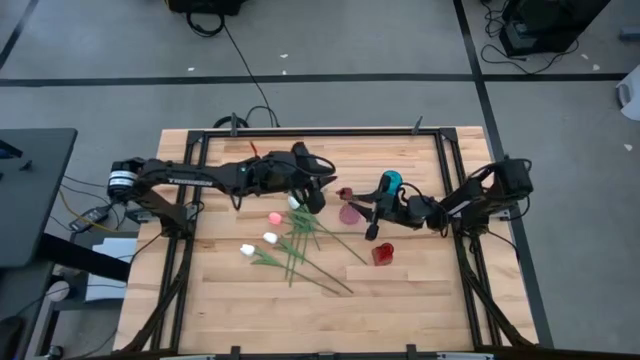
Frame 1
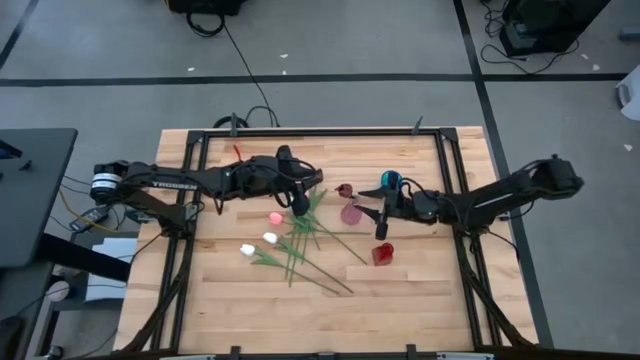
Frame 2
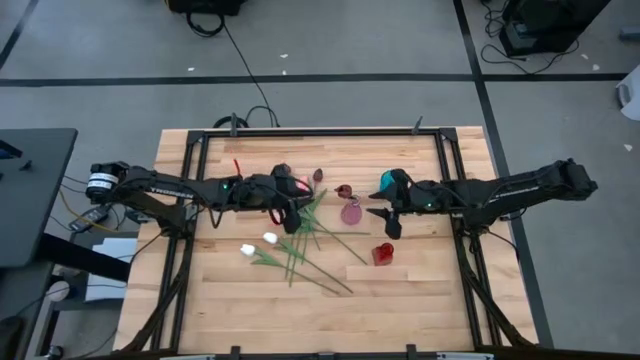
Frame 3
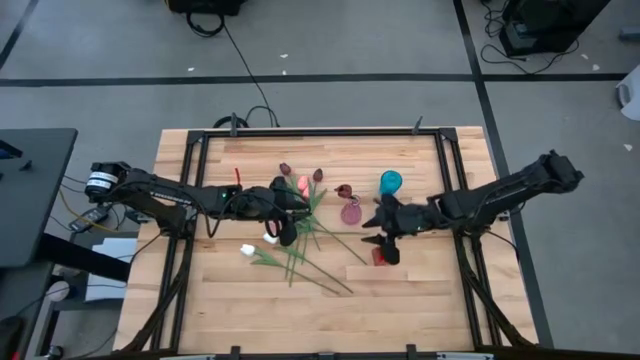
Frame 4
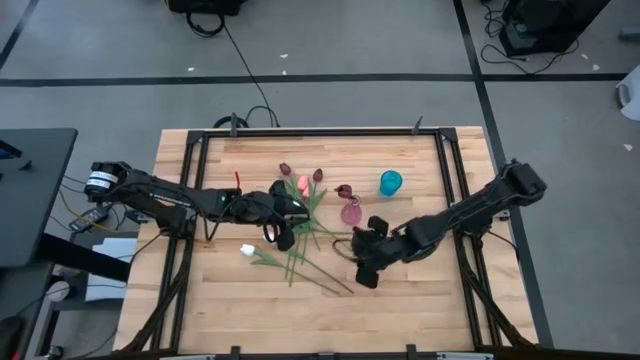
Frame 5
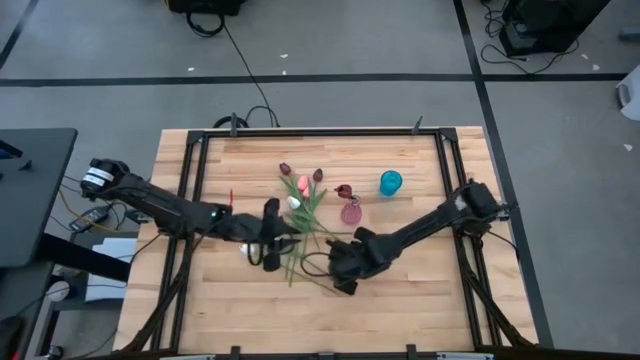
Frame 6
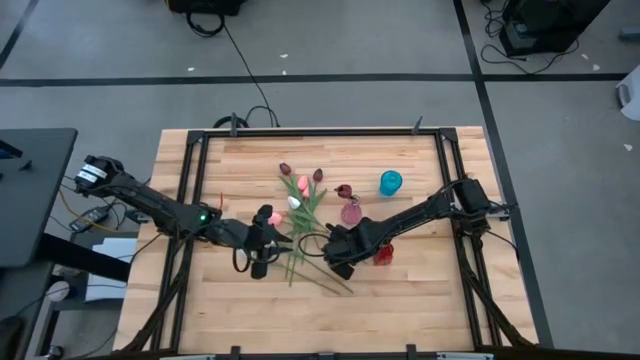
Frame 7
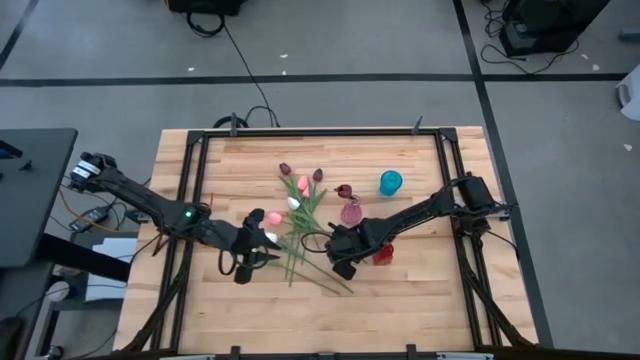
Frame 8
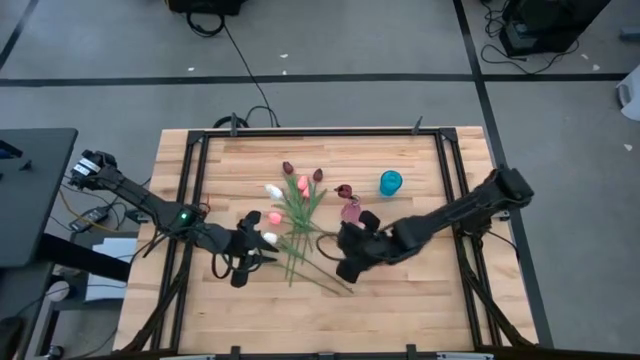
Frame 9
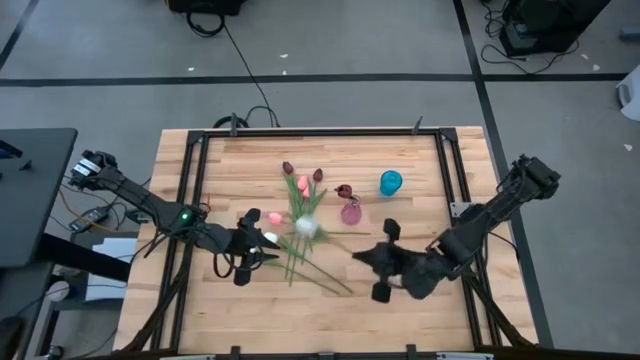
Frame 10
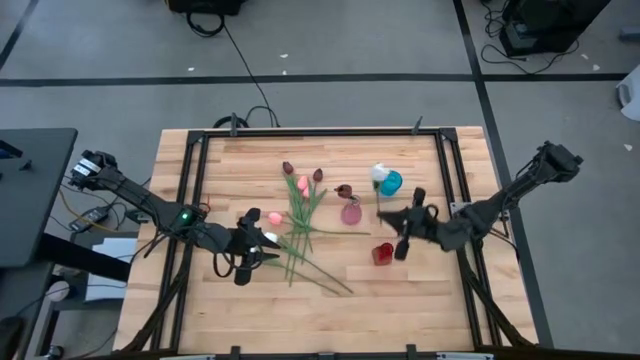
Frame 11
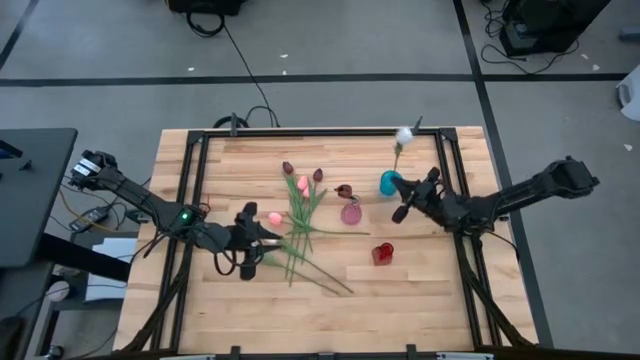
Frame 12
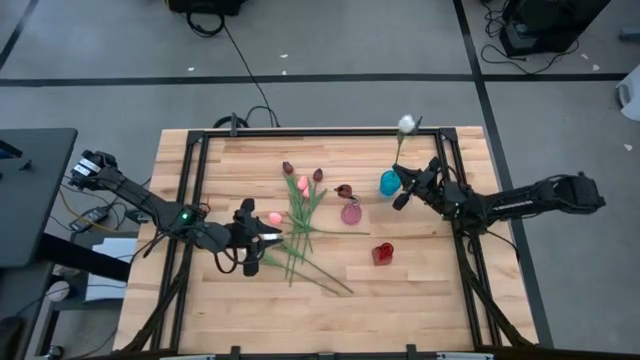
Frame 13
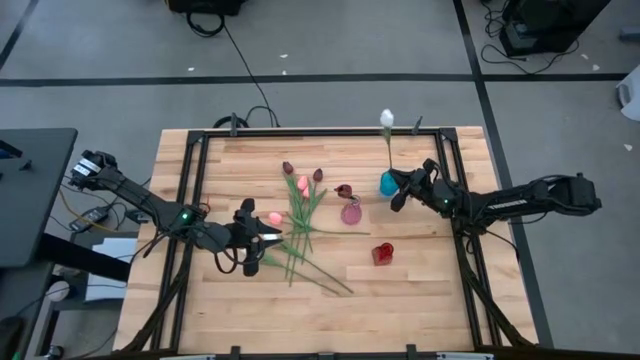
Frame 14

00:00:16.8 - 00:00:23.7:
Task: Sort flowers into vase by color
Put the white flower into the blue vase

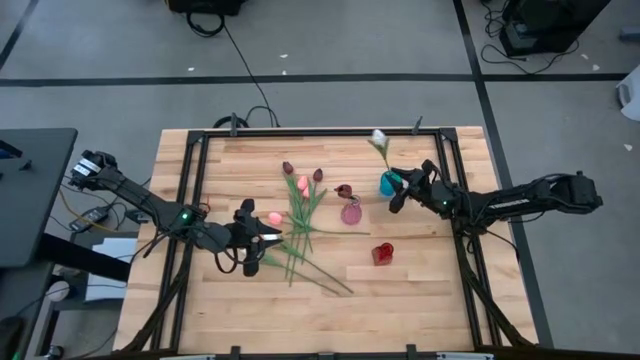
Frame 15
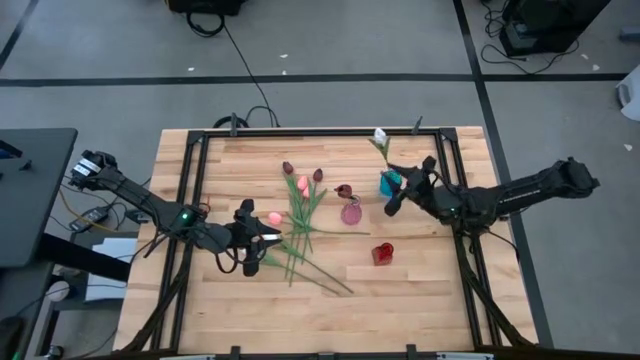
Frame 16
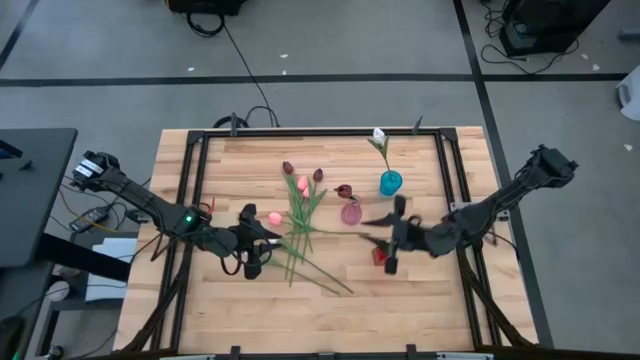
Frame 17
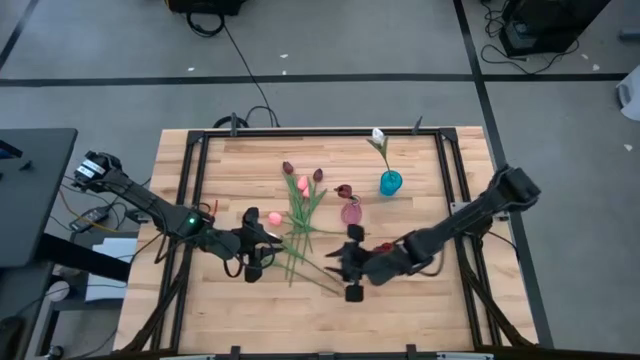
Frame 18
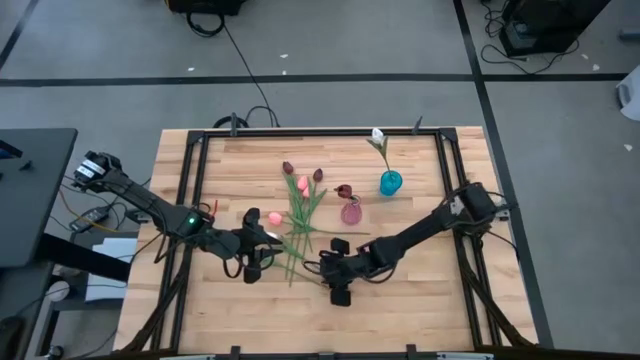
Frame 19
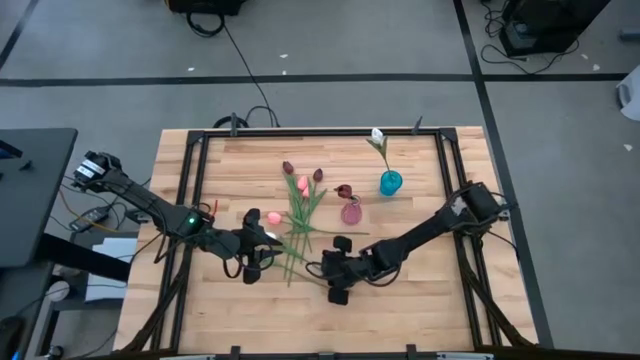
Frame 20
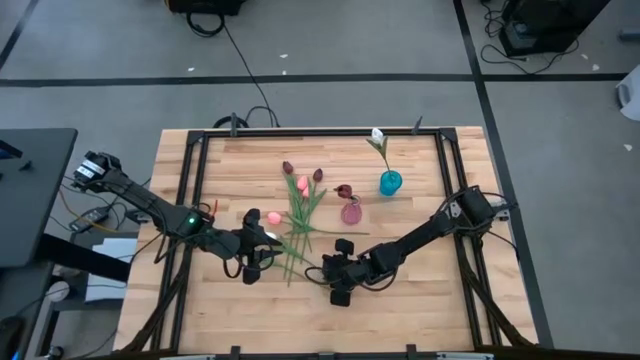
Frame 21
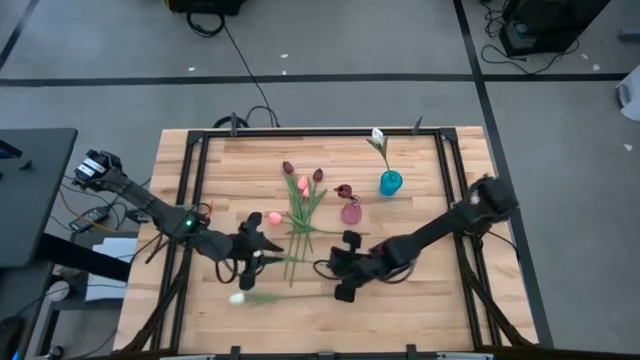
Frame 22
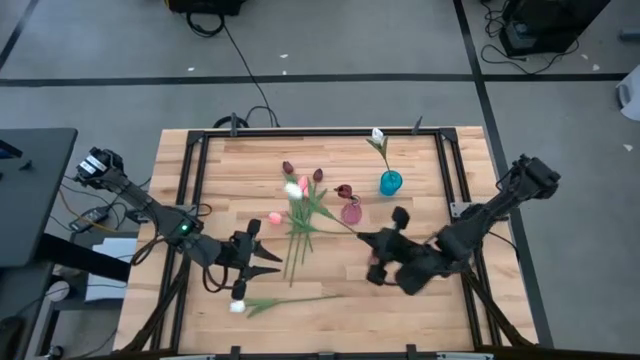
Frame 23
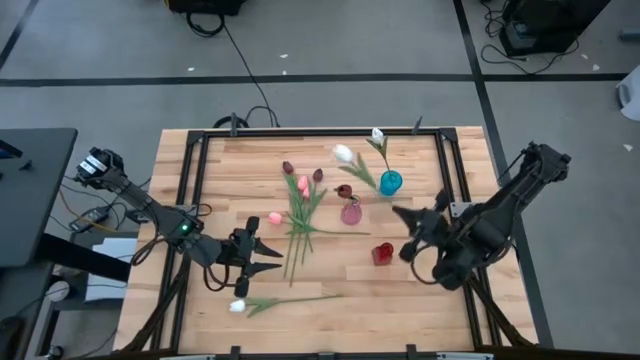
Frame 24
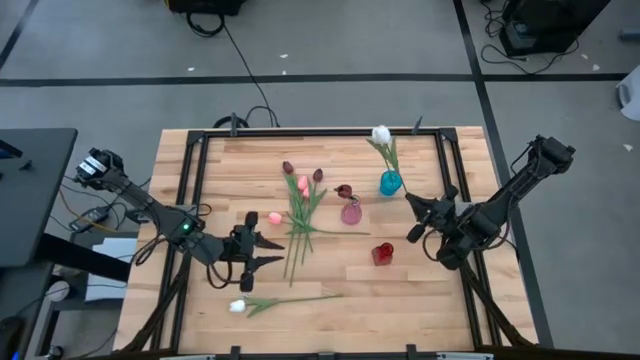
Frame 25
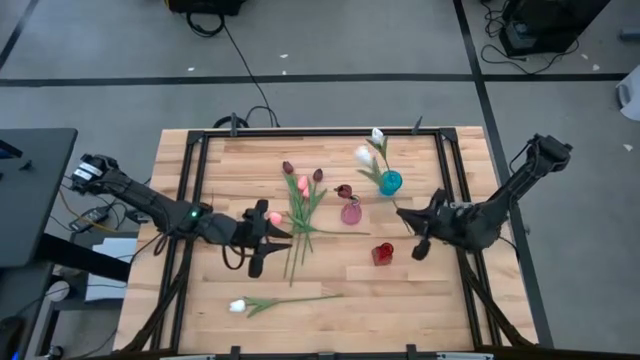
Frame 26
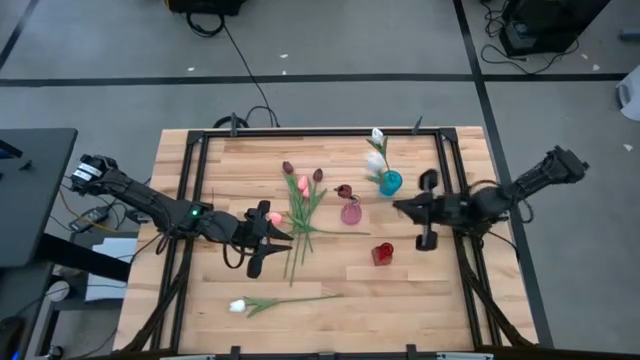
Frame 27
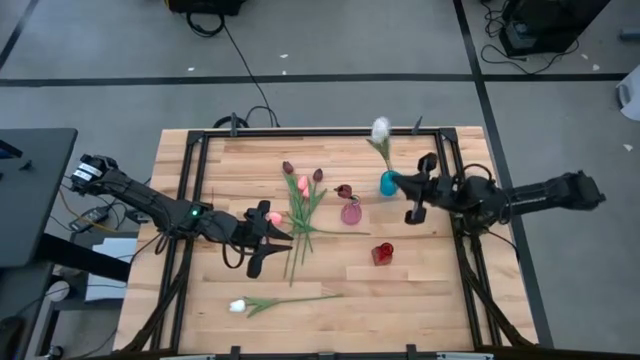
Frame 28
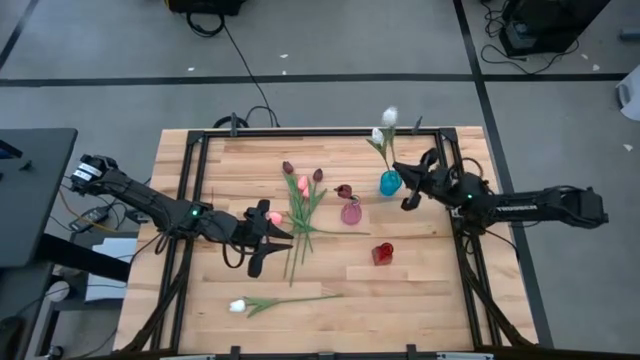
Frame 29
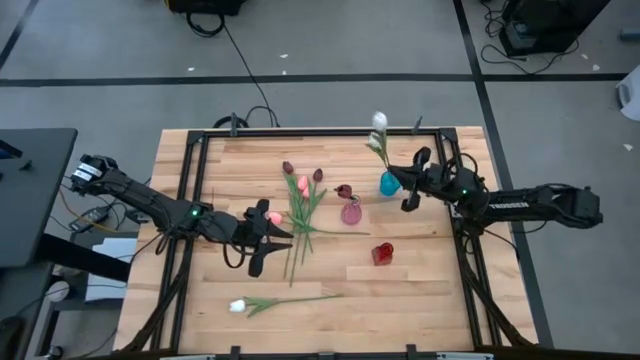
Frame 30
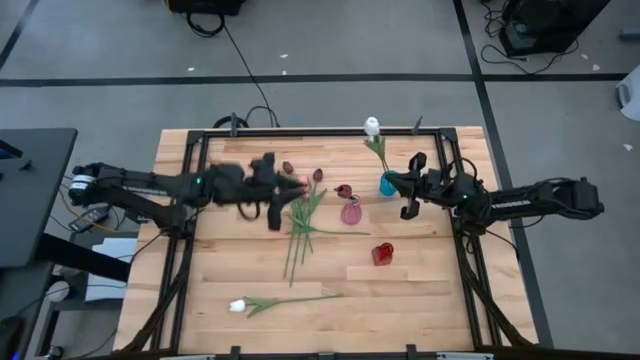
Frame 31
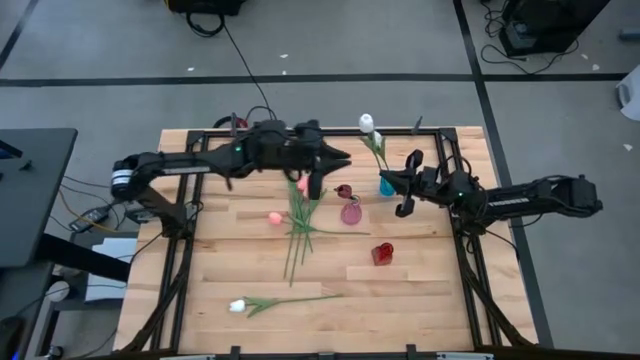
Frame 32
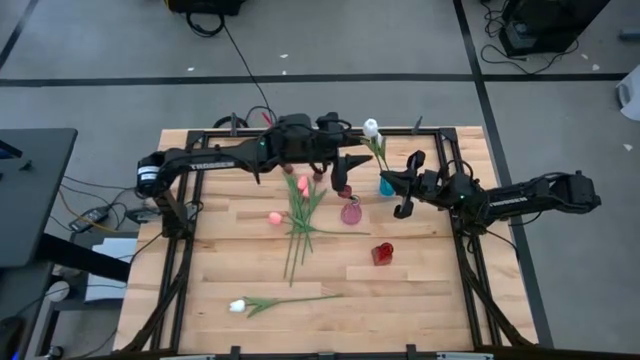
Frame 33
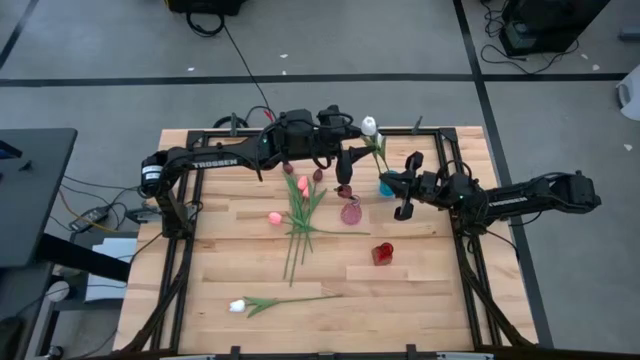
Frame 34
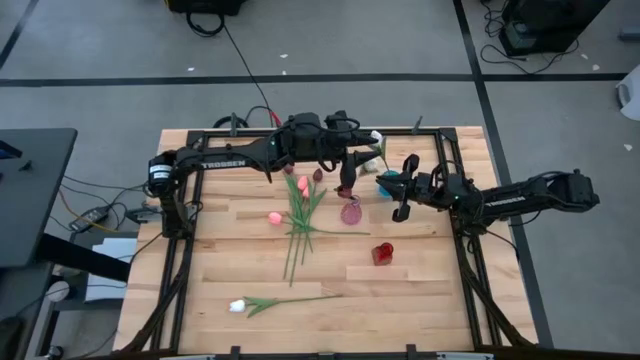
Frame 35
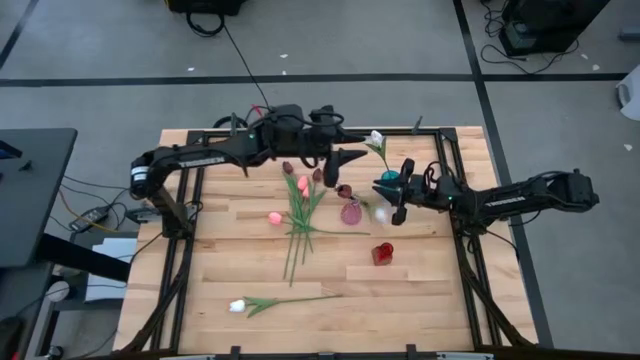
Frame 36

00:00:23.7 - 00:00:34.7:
Put the white flower into the blue vase

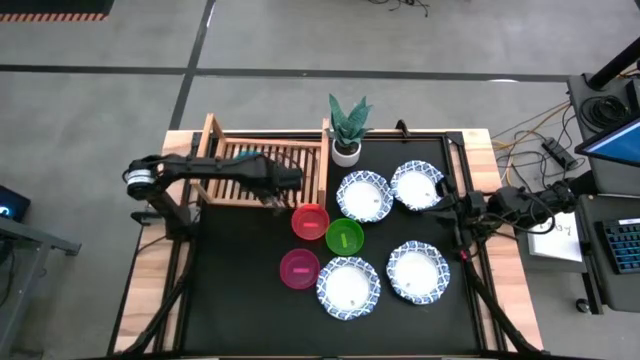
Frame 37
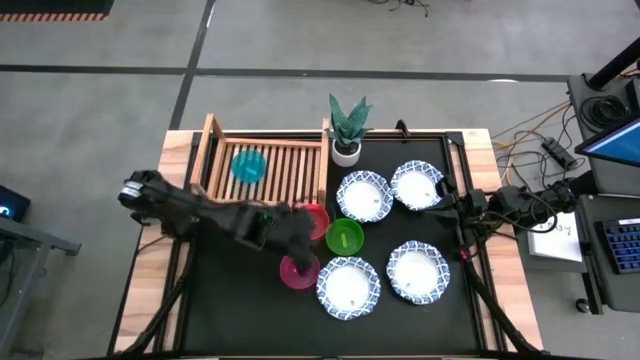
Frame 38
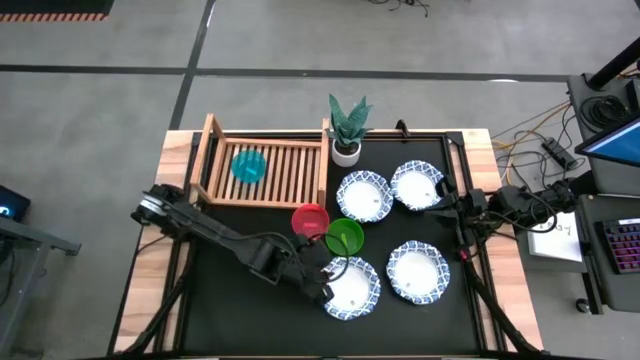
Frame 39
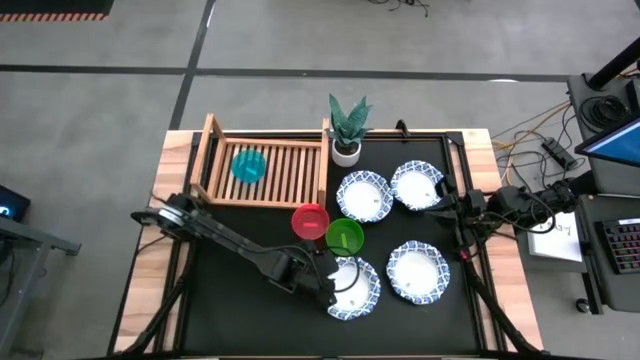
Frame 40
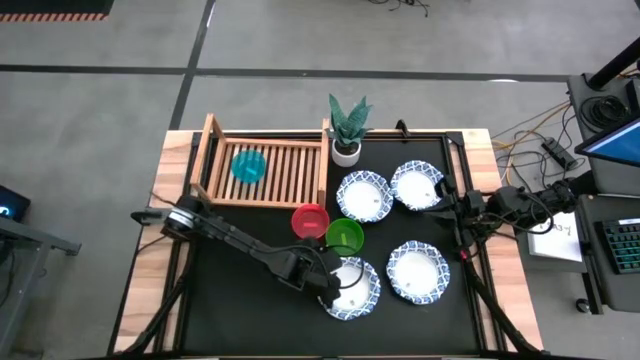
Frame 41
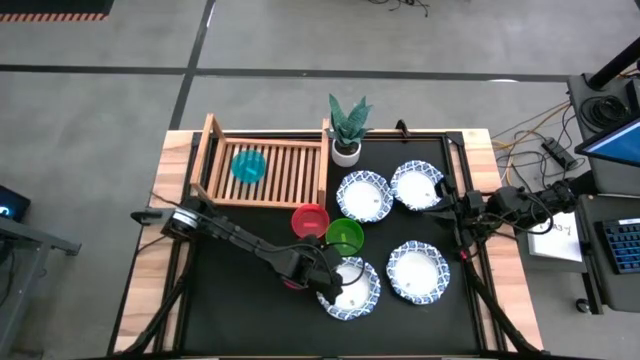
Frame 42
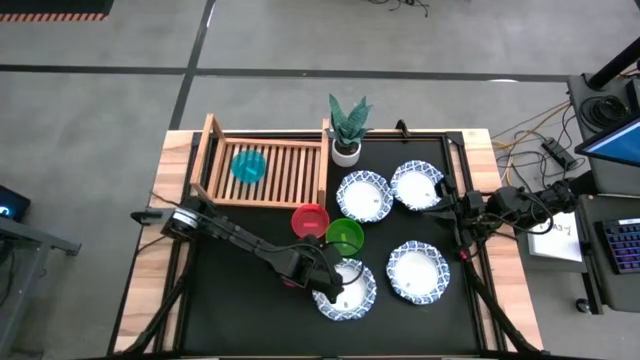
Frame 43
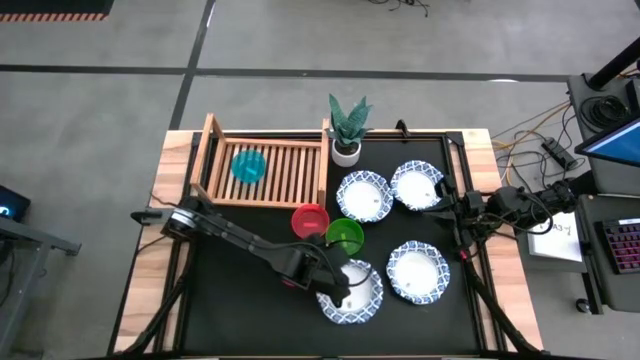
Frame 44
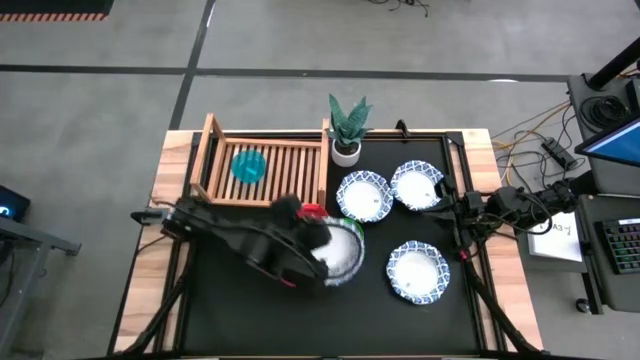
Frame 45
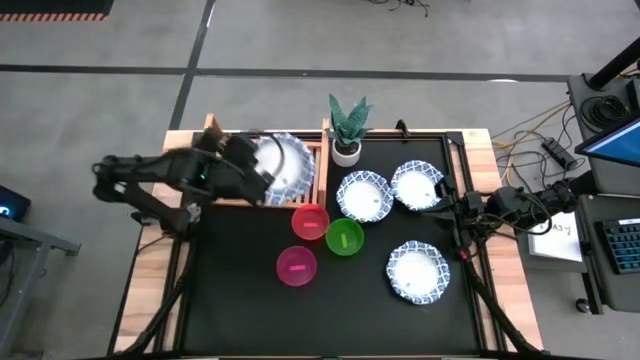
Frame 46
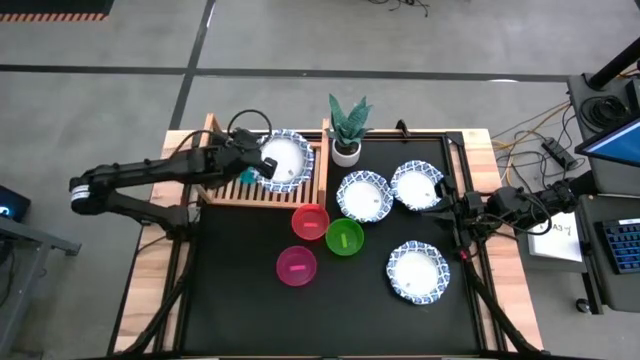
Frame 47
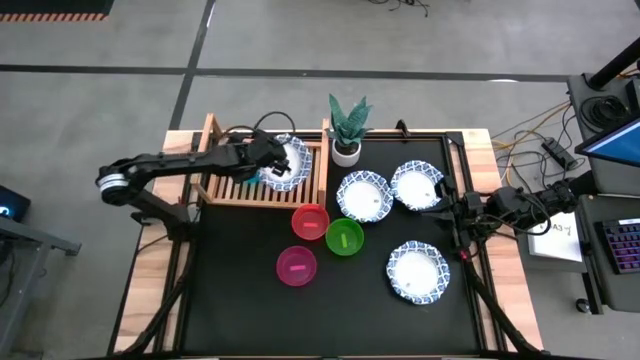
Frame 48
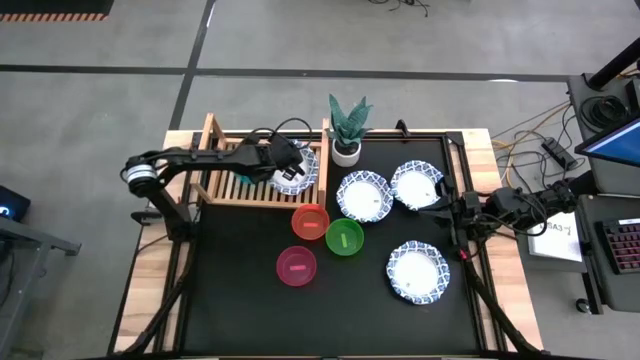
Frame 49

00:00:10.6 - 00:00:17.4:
Task: Place and stack bowls onto a shelf
Put the blue patterned bowl on the shelf
